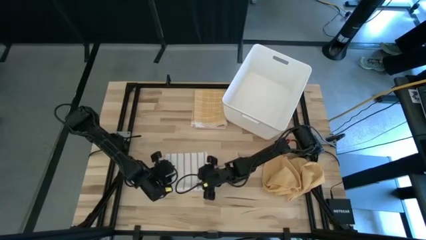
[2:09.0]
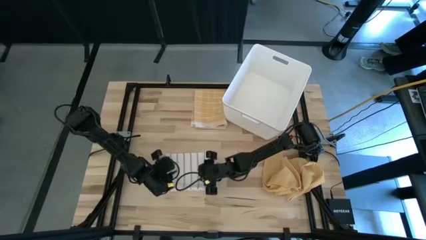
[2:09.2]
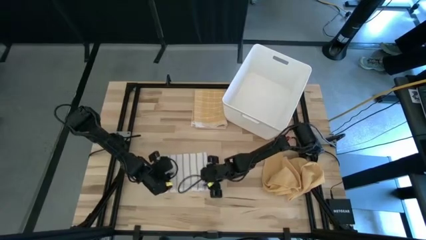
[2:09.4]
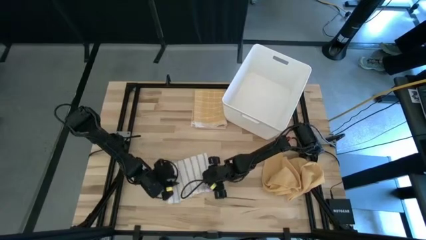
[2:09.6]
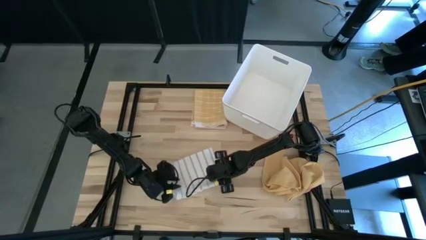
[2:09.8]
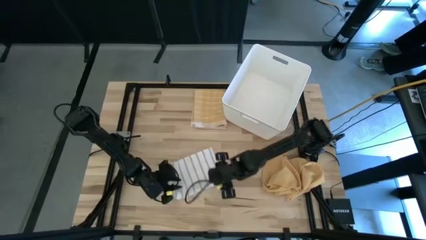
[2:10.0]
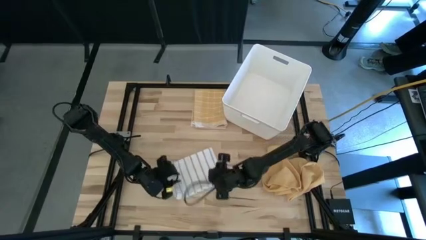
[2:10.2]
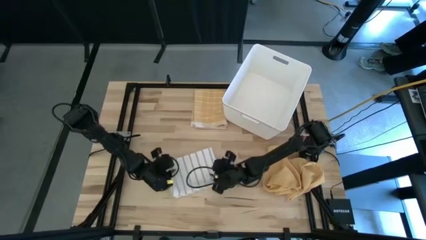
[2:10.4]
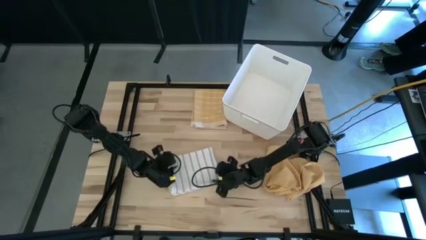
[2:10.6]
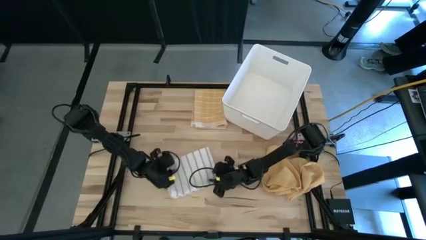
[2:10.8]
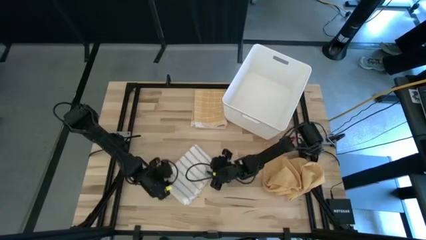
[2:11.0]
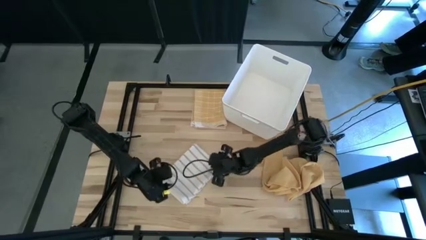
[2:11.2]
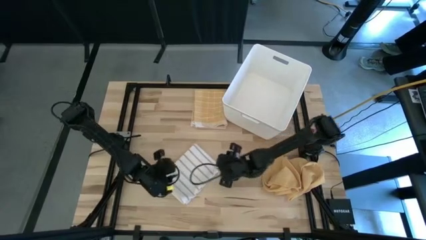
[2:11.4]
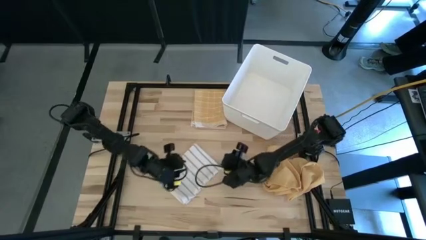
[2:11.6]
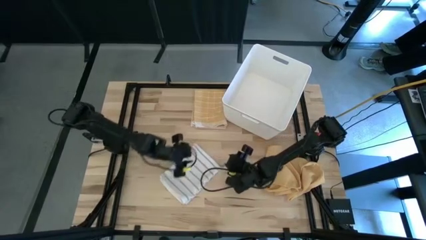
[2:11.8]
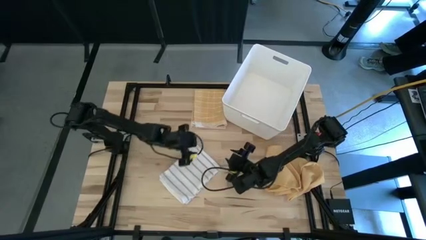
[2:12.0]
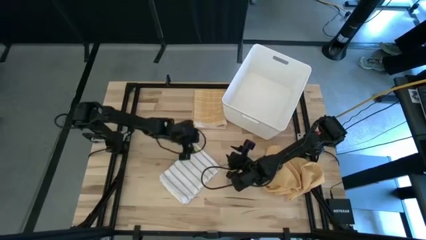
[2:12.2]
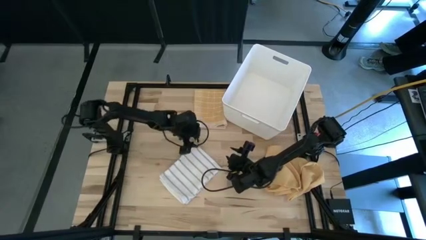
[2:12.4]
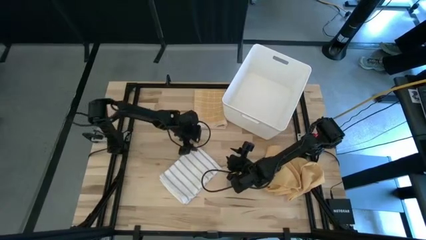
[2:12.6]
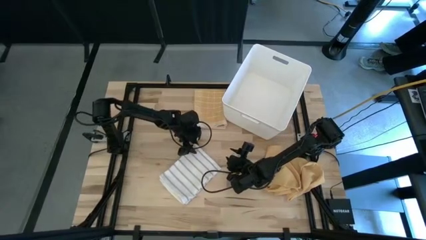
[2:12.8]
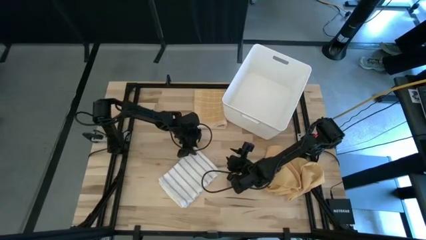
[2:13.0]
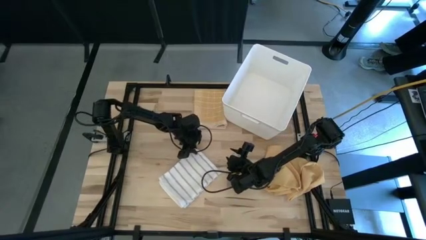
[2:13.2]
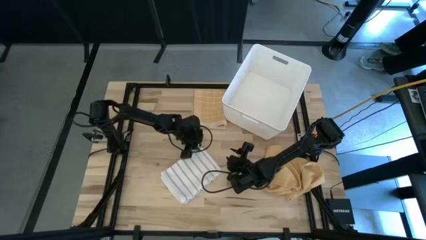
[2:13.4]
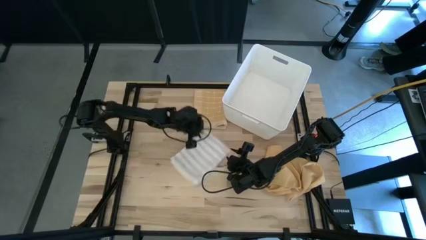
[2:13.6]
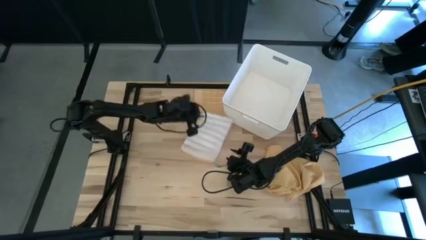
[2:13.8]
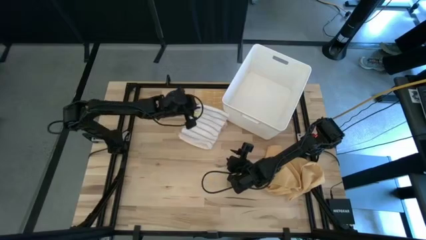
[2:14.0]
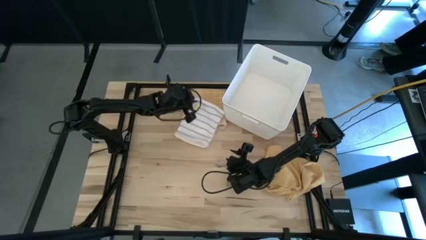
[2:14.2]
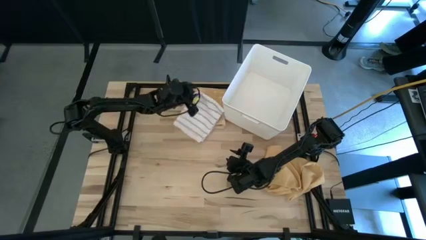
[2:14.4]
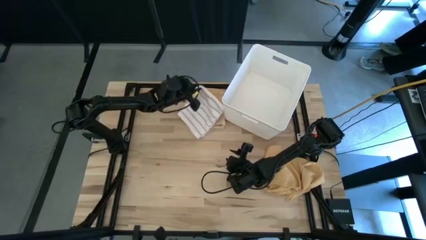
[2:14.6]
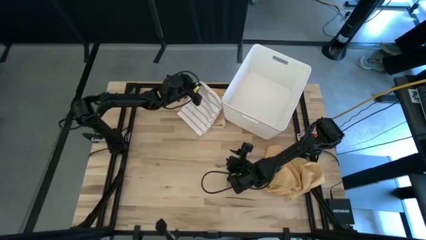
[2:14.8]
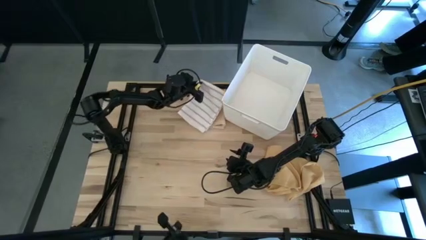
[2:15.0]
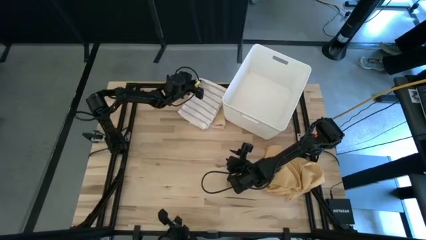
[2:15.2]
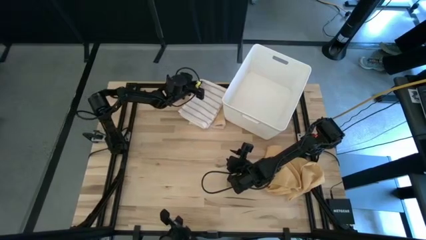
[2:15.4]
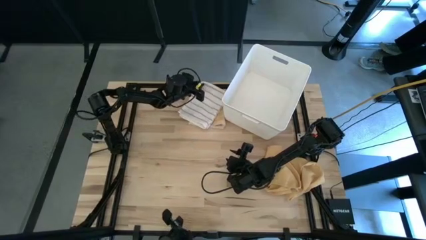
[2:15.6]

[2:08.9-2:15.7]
Task: Fold towel
Stack the white towel on top of the yellow patterned towel

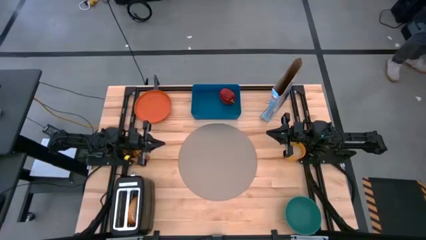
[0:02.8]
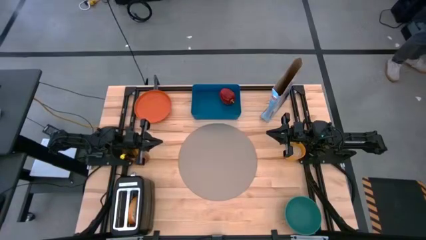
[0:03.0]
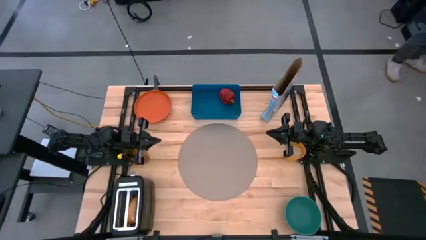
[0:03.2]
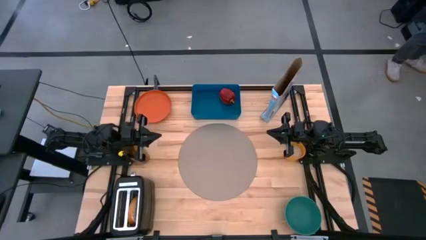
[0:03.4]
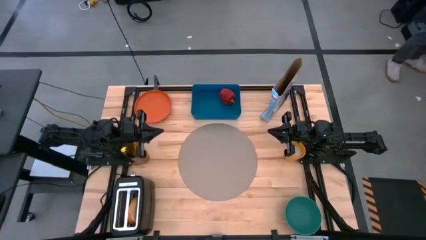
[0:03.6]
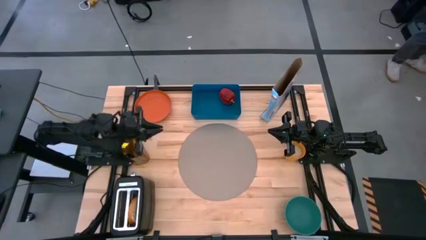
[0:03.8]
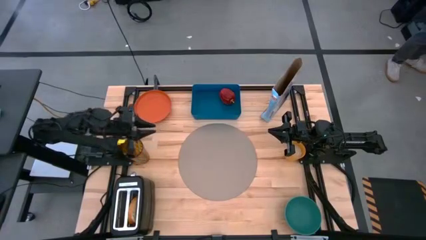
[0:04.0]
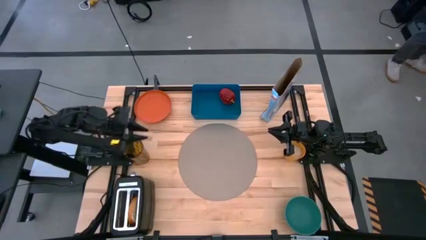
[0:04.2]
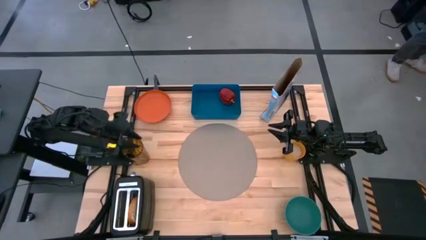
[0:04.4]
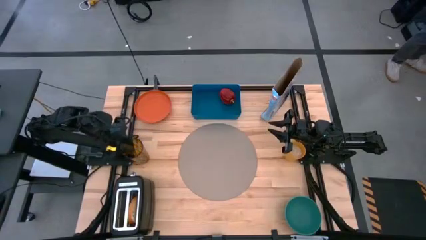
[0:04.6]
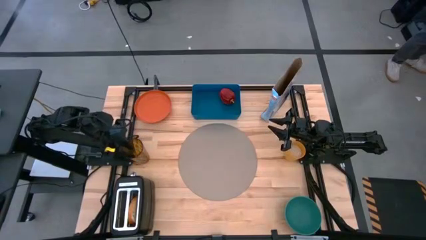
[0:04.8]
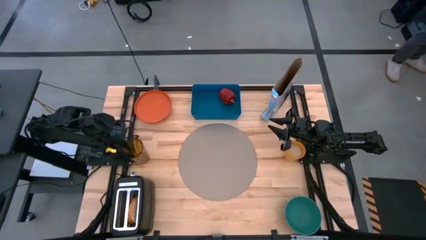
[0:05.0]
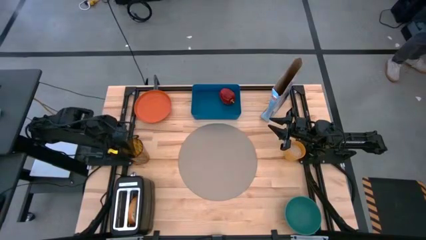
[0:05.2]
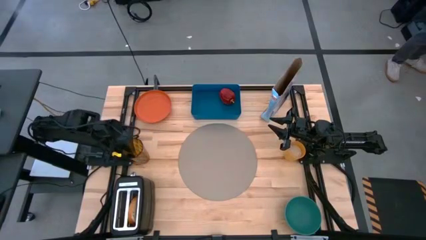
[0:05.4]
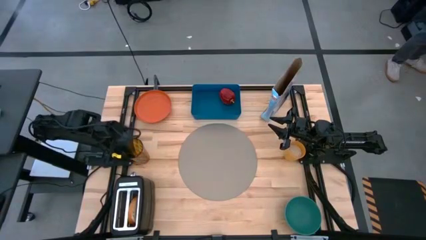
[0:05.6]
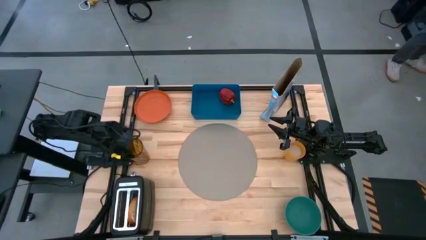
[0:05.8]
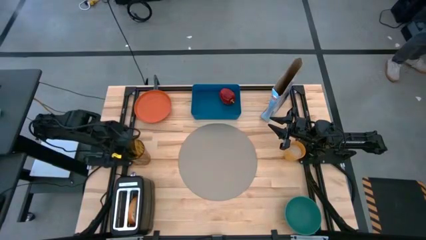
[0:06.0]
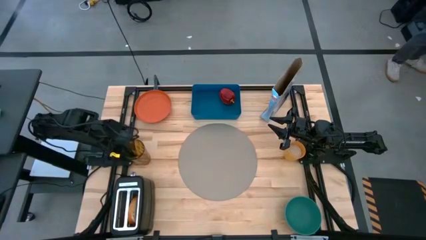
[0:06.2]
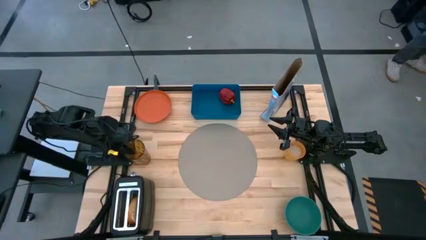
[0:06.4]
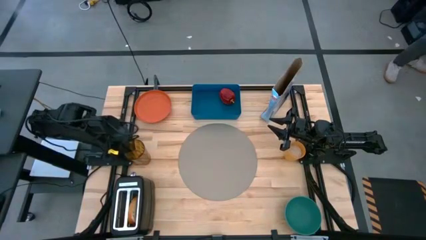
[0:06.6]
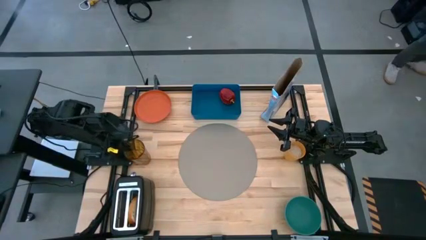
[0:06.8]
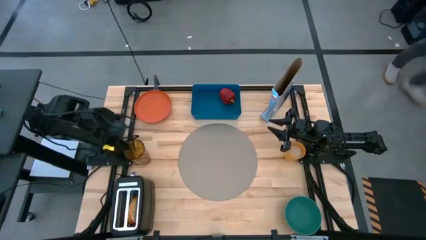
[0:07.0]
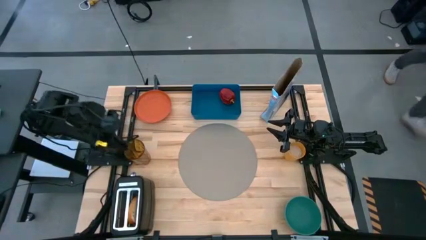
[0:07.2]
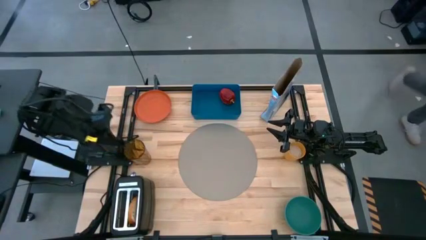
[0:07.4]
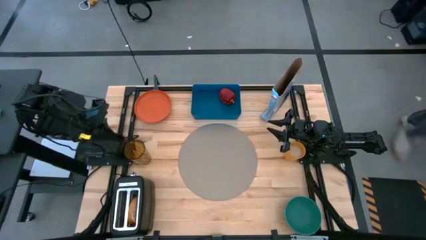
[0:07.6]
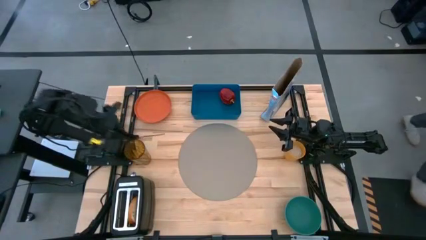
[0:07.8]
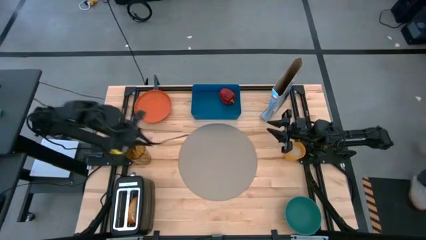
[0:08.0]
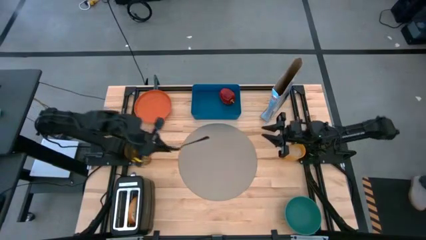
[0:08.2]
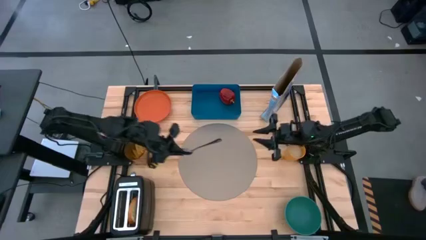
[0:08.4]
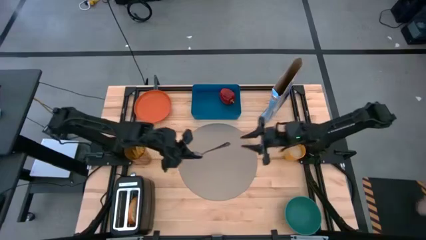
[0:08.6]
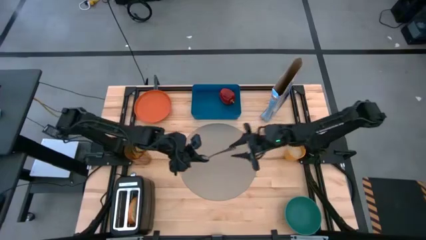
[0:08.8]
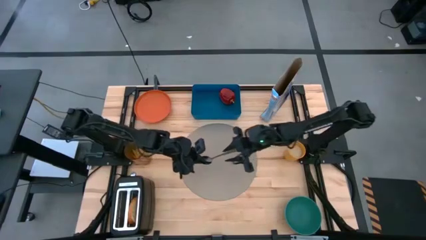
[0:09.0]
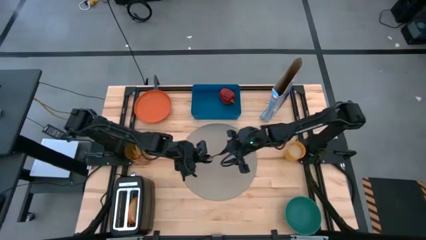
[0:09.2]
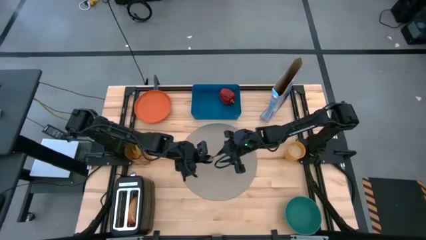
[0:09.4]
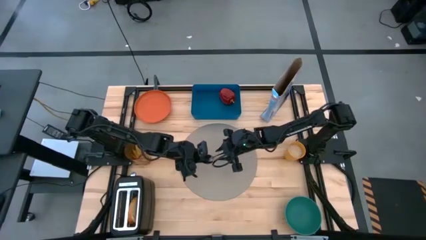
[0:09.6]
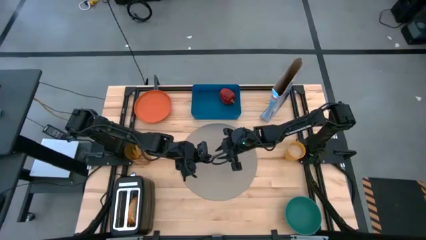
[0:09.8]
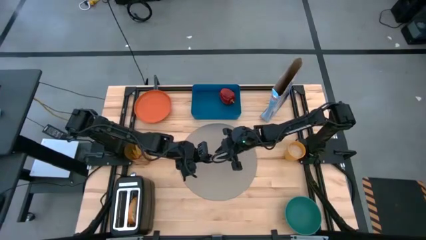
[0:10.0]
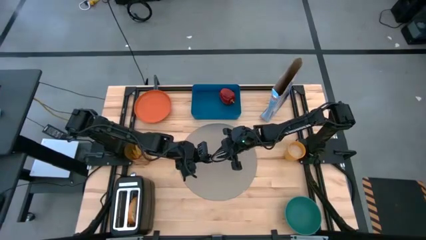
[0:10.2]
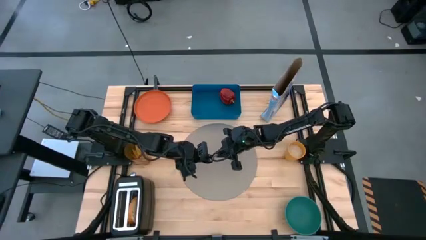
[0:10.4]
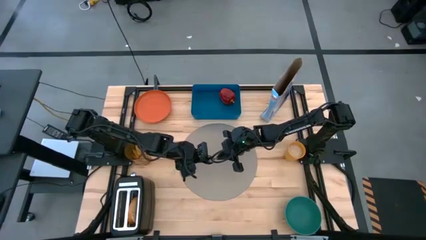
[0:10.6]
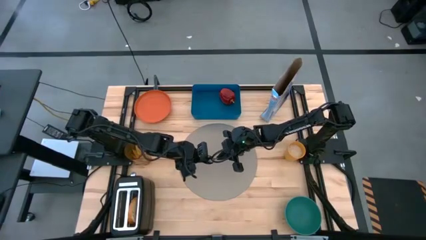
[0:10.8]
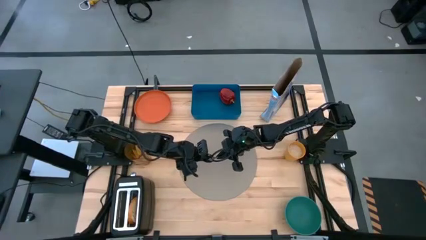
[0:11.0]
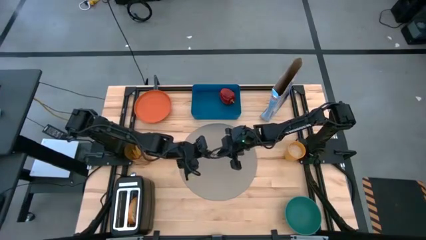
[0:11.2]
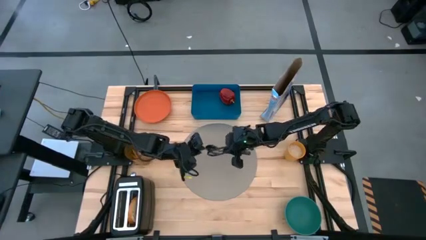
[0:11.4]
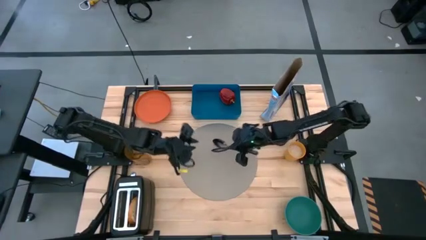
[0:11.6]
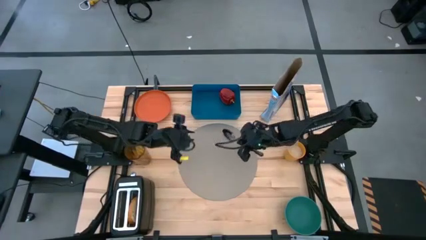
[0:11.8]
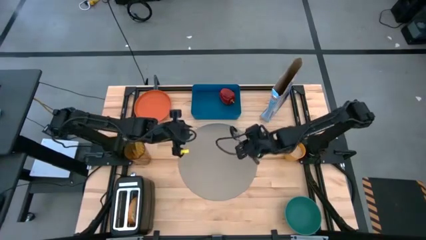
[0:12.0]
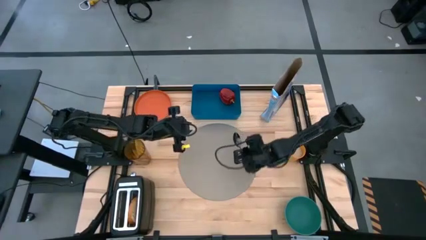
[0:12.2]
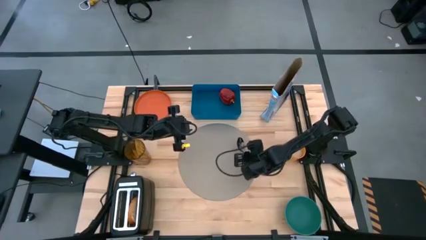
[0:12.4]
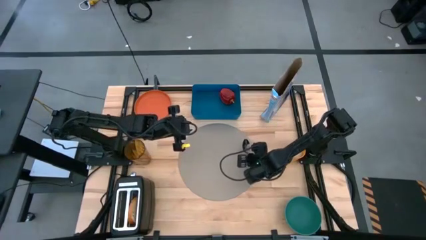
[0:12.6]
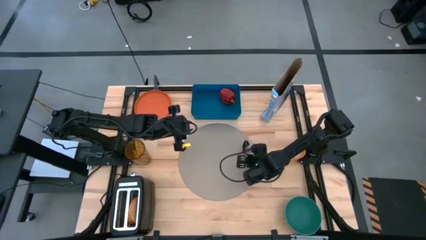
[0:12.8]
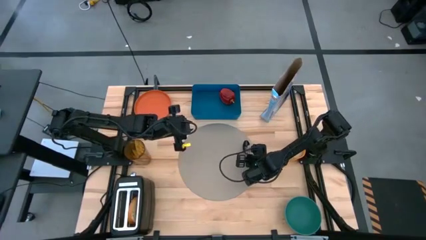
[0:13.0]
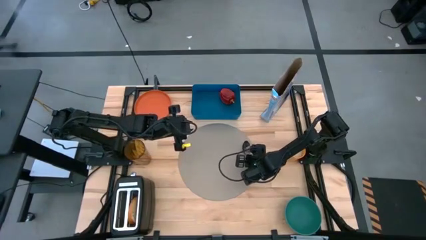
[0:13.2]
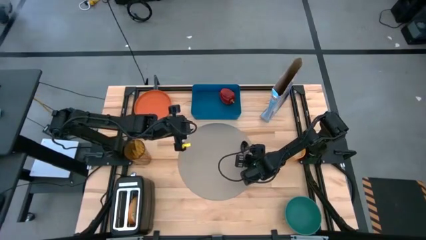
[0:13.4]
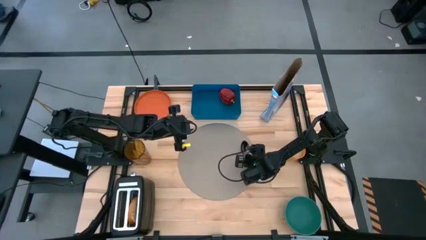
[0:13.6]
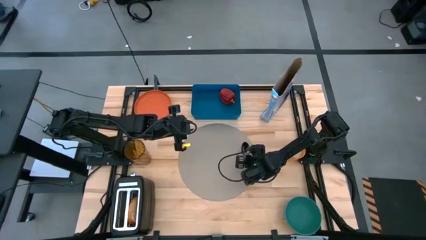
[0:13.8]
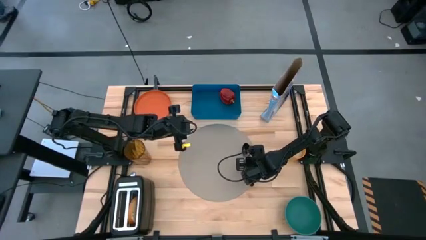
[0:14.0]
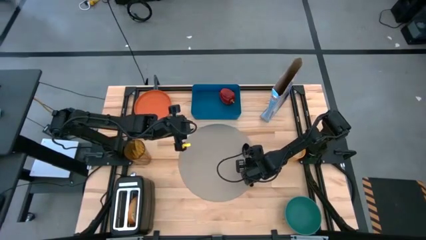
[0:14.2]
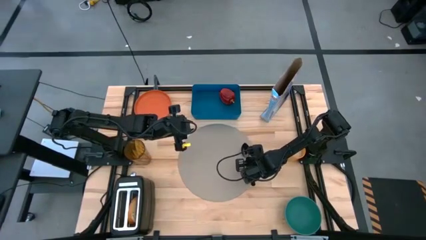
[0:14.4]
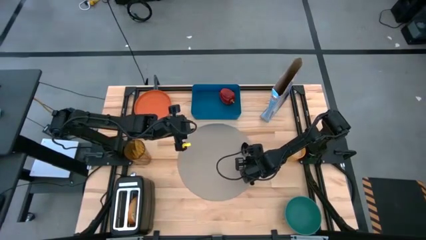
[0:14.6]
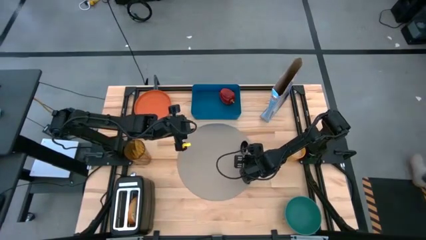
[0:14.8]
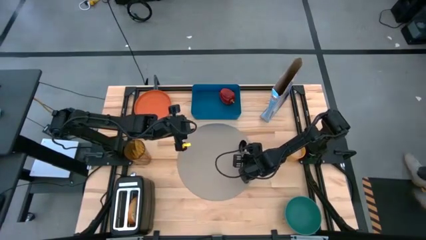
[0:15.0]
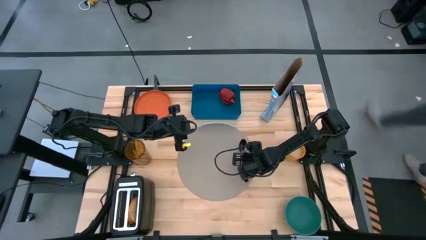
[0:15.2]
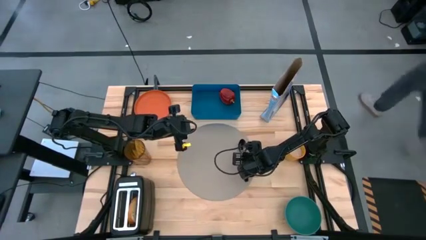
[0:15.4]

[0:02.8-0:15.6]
Task: Arrange a breakfast setting
Put the black spoon on the right of the gray table mat
